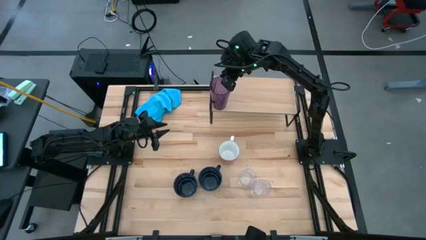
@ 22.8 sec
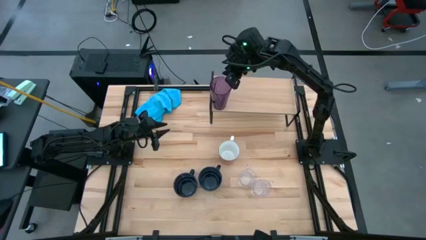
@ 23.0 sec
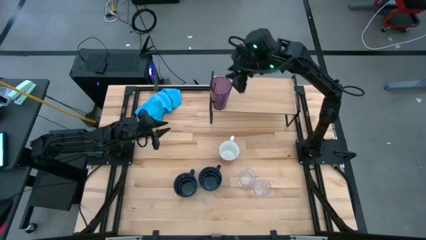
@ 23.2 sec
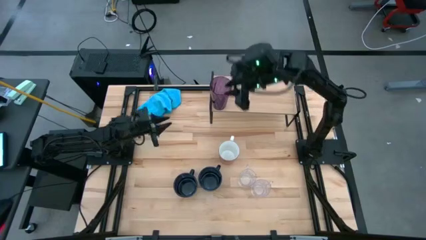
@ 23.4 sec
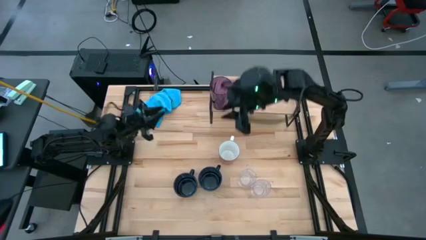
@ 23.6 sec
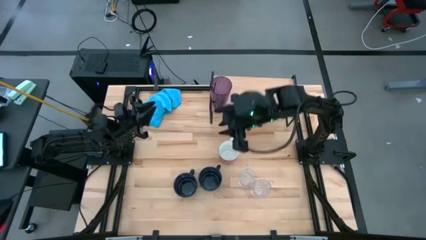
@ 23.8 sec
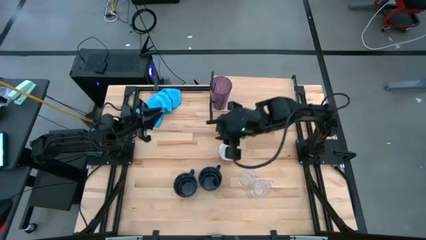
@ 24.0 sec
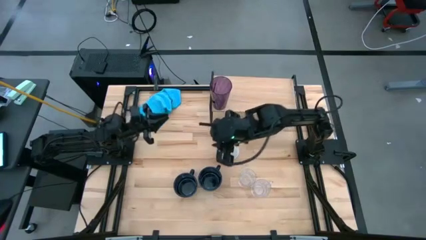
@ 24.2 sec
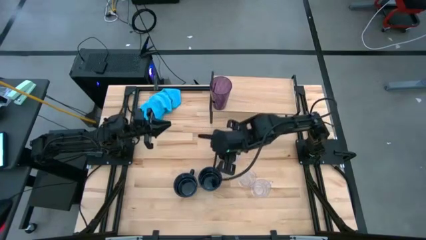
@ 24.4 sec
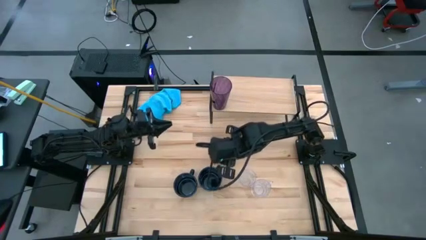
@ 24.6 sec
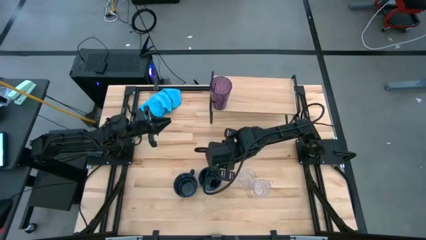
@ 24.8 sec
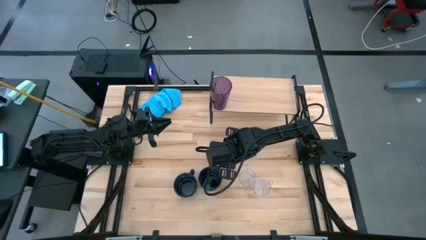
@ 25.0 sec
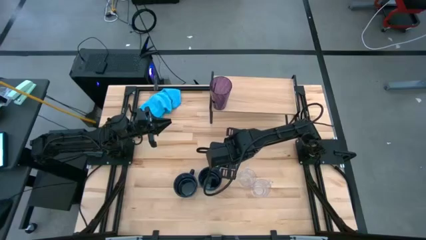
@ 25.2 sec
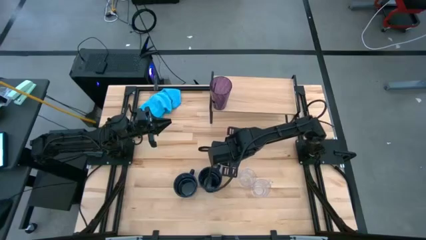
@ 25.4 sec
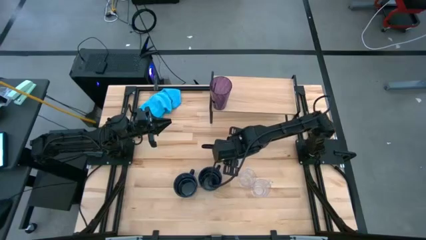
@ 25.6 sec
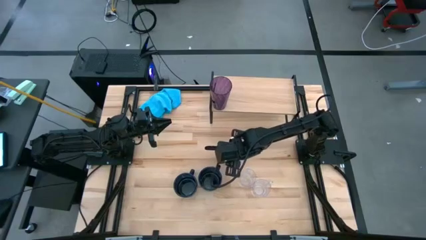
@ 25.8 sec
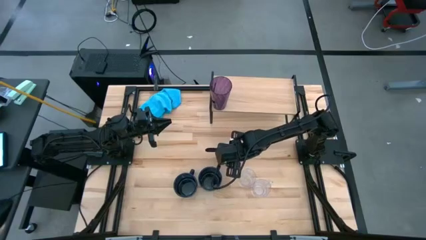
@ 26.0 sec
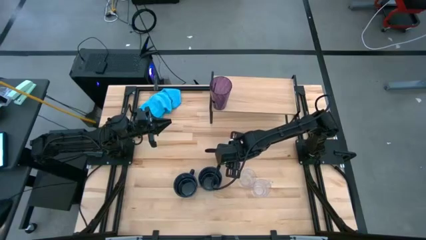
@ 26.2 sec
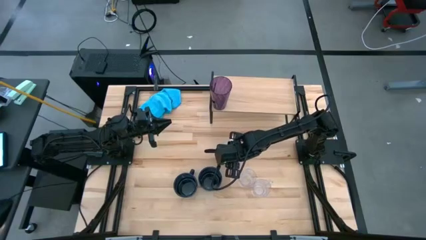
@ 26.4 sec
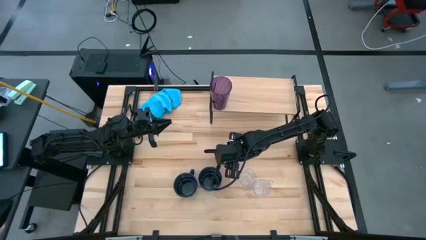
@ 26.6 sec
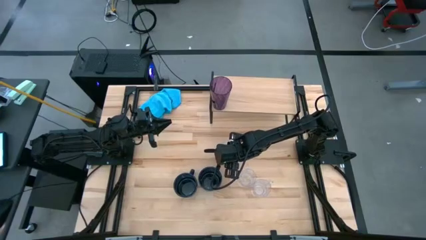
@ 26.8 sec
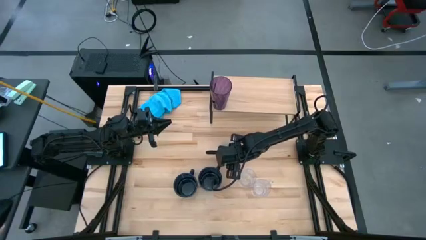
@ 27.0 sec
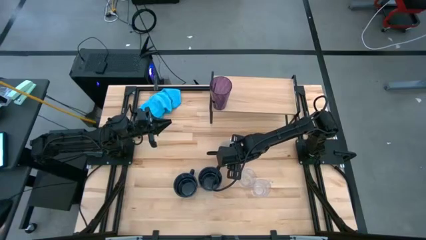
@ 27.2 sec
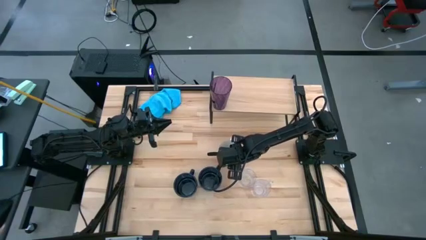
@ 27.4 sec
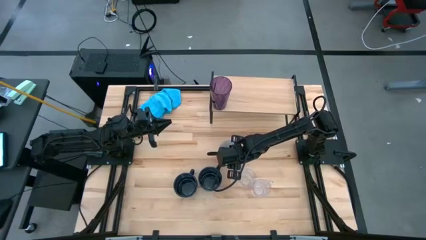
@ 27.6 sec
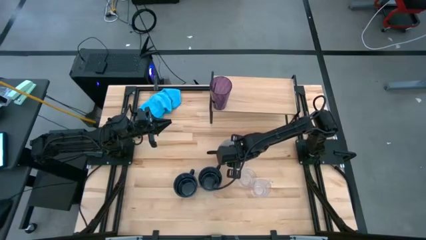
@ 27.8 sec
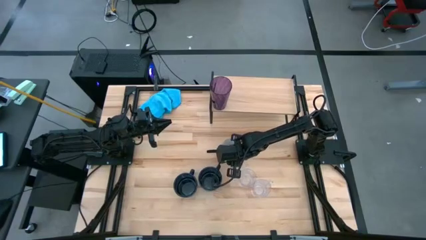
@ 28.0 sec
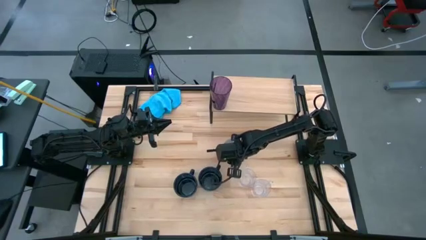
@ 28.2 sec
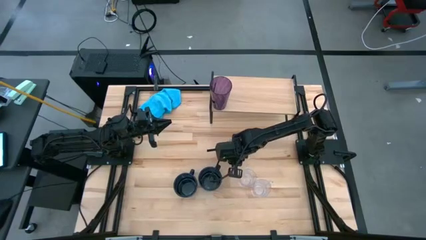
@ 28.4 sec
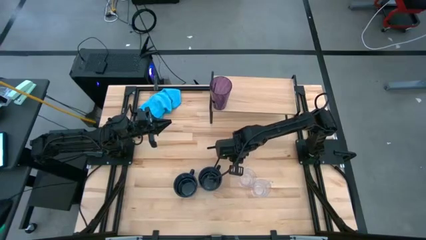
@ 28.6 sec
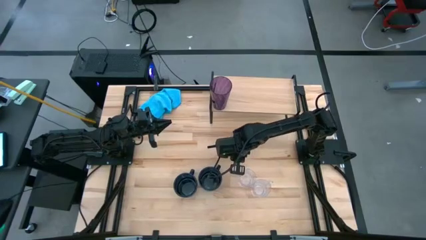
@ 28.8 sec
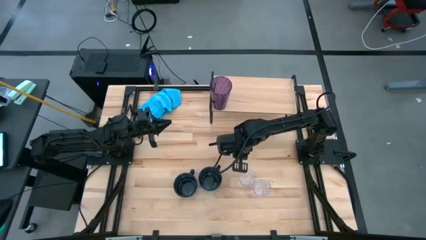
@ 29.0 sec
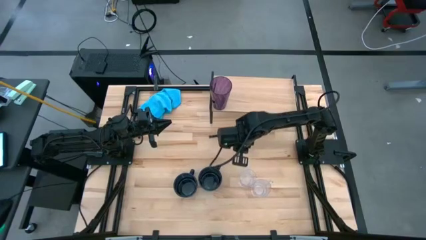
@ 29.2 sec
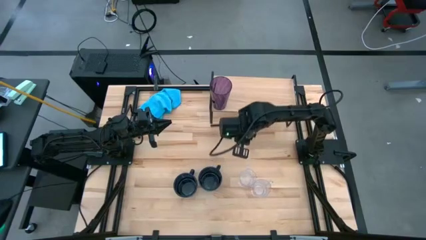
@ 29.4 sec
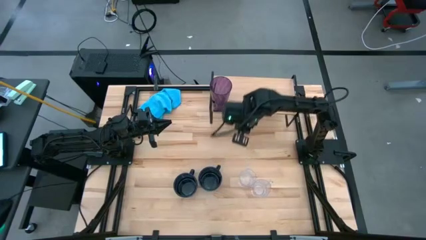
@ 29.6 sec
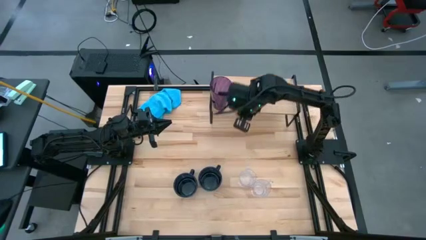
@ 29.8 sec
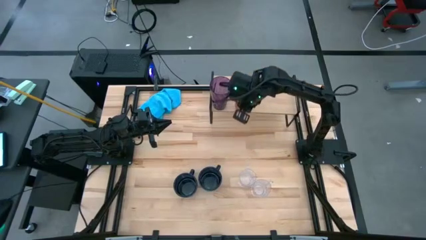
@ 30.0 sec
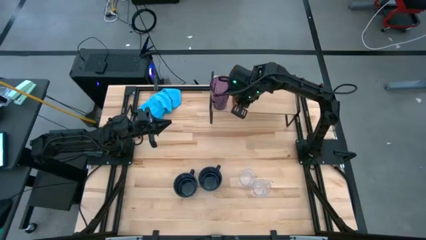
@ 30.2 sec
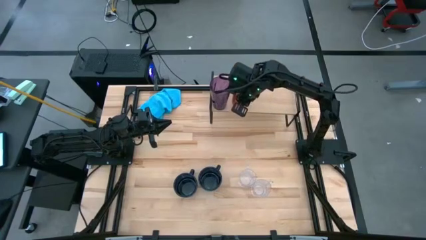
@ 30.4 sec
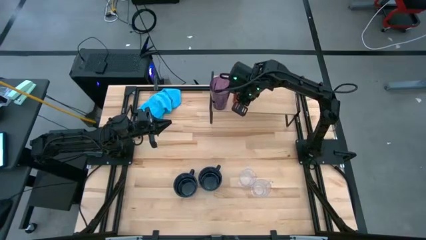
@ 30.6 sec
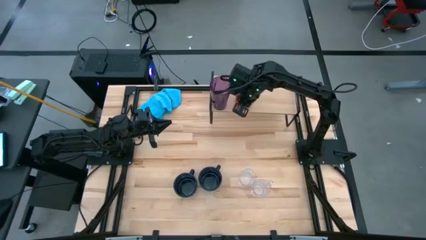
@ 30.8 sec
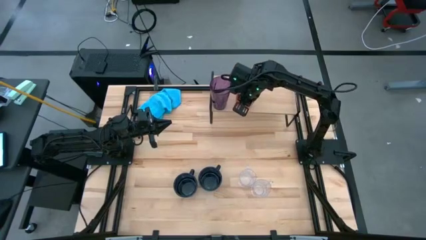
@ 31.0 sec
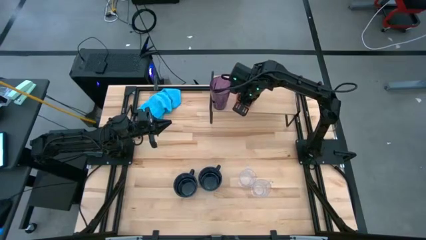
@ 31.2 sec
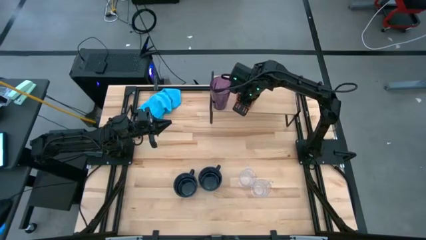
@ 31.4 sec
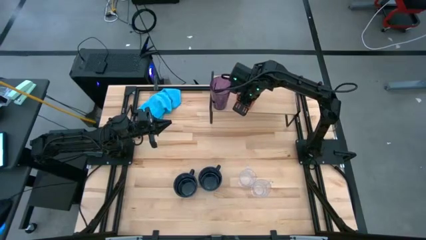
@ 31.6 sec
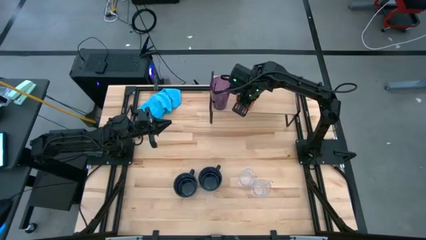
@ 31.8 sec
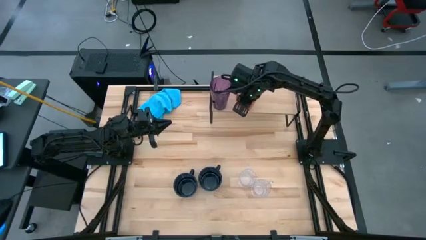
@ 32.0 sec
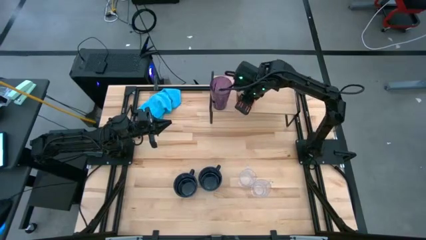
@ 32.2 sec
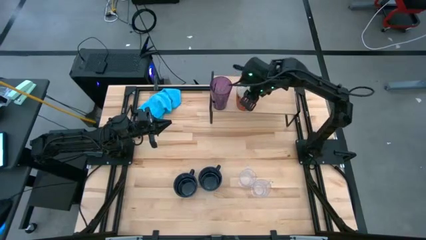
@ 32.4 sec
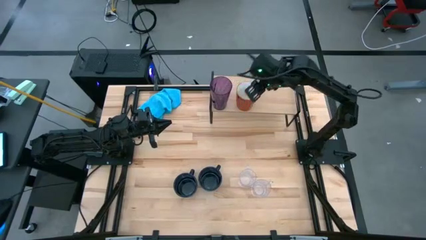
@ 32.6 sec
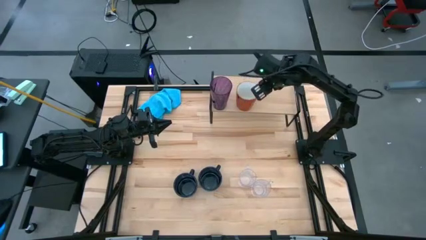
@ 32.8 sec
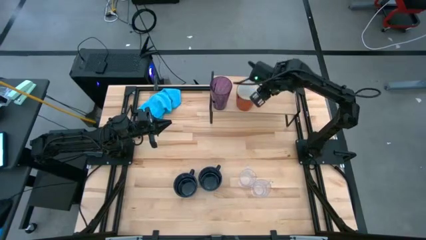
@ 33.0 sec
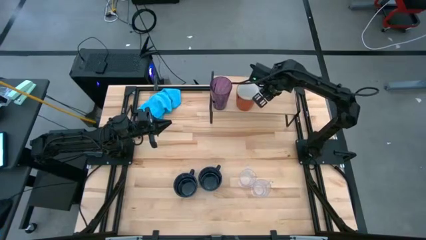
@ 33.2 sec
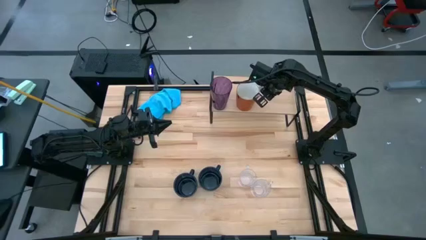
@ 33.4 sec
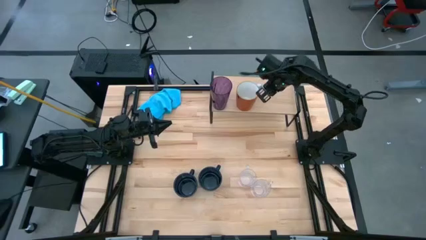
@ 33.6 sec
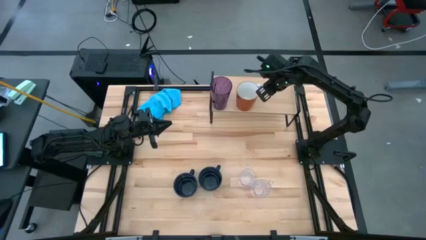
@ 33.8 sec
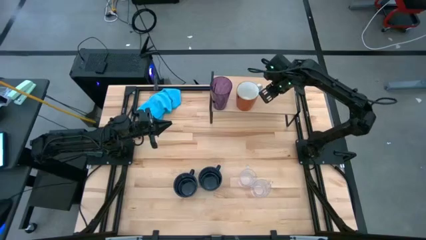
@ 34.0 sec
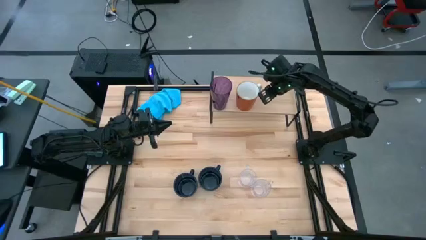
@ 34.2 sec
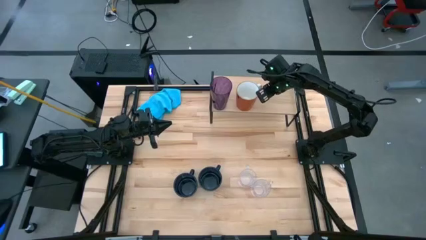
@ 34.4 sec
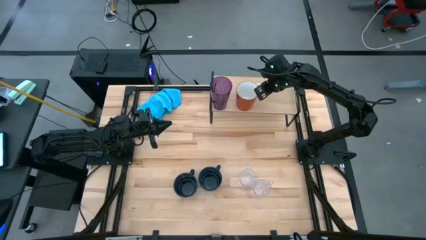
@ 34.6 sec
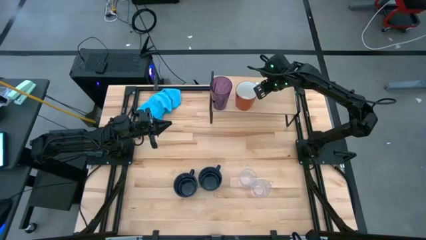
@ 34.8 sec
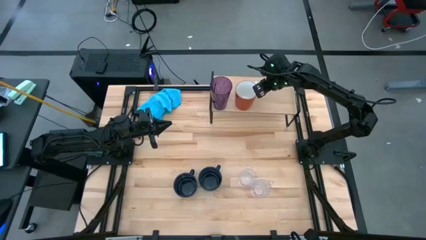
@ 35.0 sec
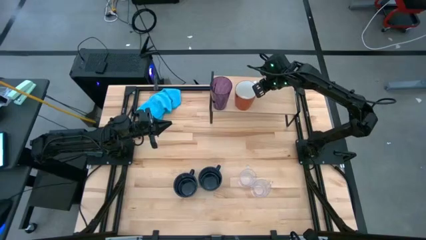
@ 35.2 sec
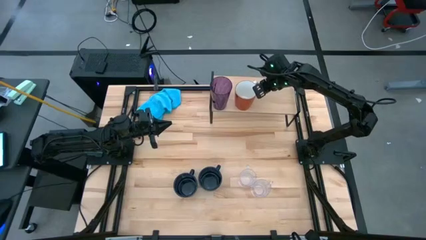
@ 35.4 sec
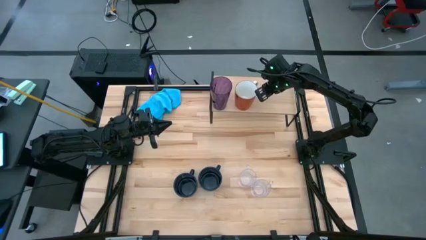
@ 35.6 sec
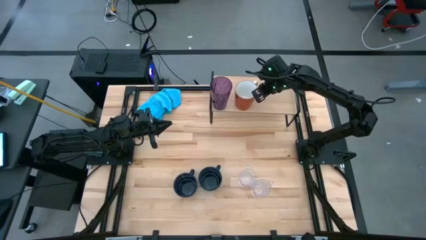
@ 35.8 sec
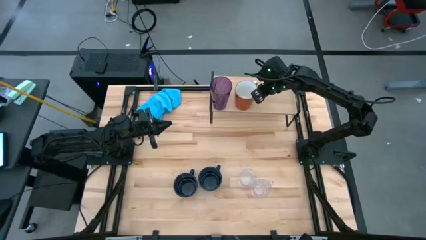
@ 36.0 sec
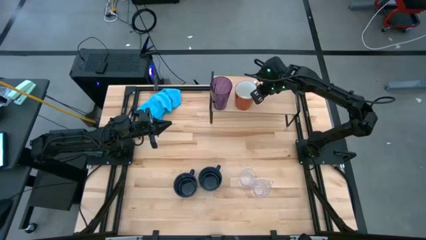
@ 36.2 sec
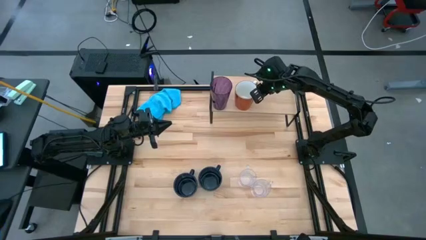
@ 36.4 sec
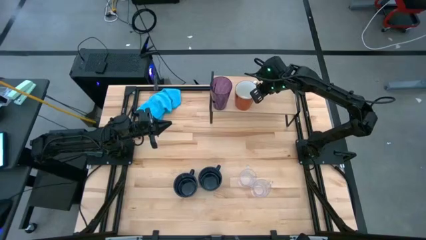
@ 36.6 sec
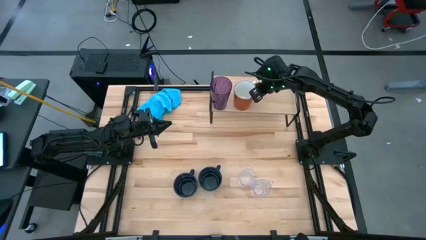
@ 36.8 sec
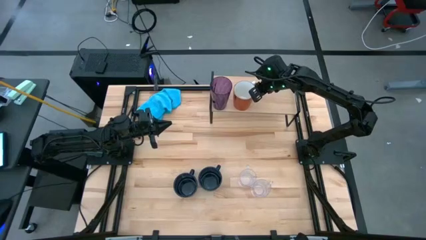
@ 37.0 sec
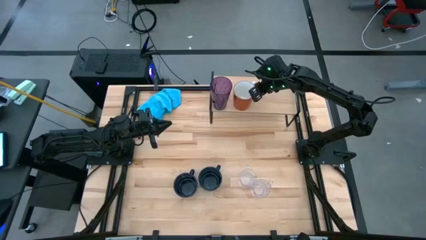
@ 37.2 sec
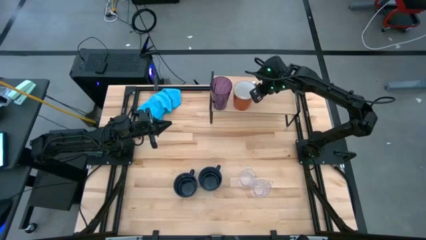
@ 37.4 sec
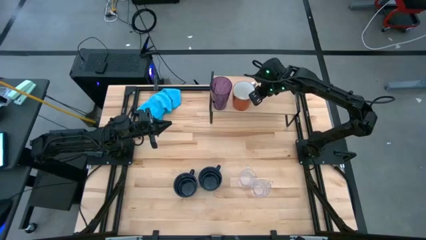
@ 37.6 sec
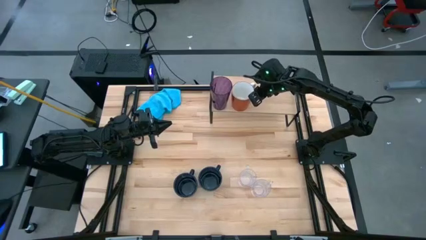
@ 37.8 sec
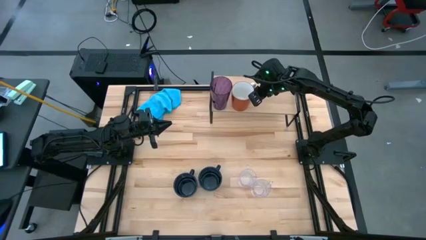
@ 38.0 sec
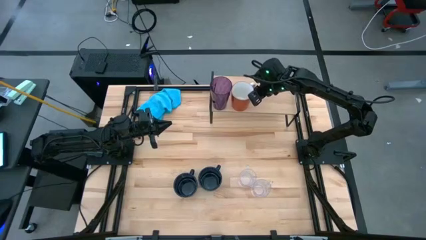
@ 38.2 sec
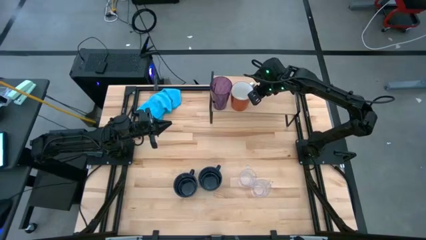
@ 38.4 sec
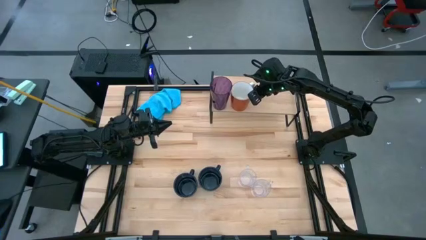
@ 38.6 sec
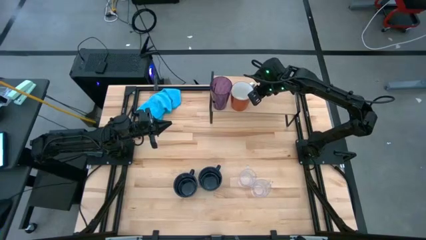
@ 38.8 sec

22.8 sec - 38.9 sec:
Task: Stack small to large cups/mugs on shelf
Put the orange mug on the shelf
